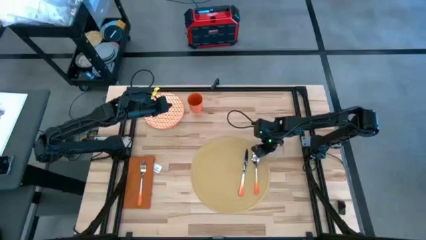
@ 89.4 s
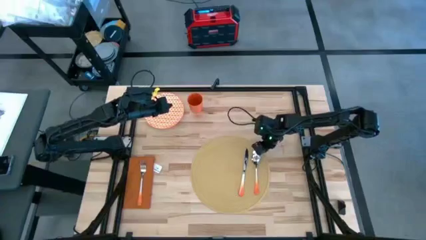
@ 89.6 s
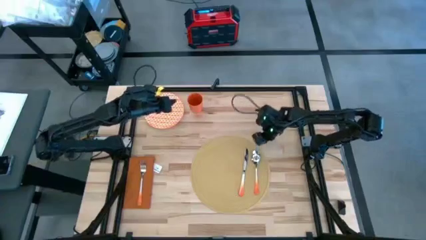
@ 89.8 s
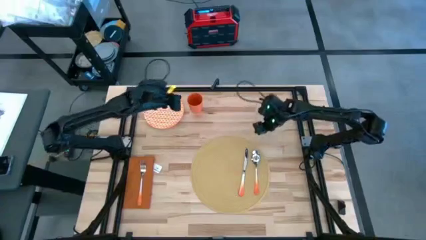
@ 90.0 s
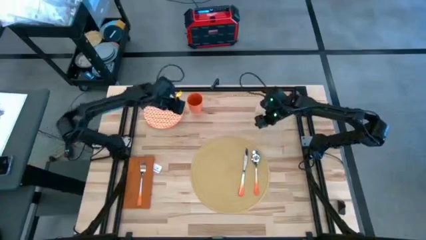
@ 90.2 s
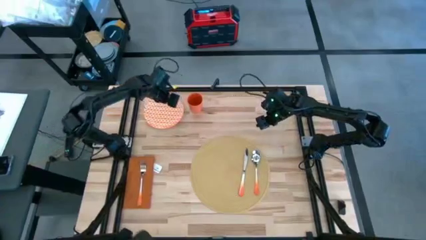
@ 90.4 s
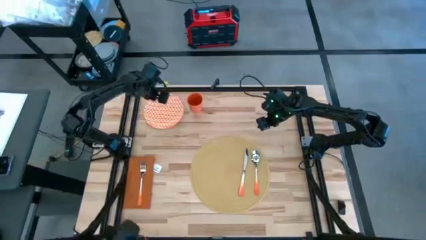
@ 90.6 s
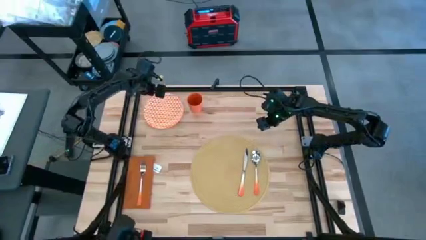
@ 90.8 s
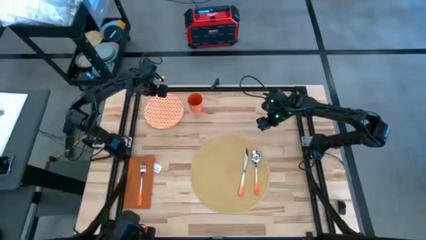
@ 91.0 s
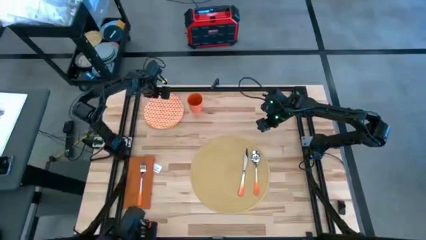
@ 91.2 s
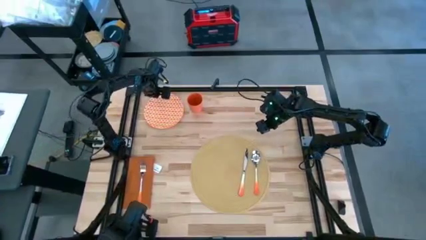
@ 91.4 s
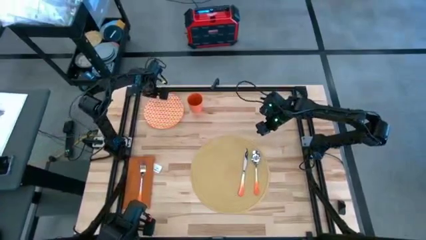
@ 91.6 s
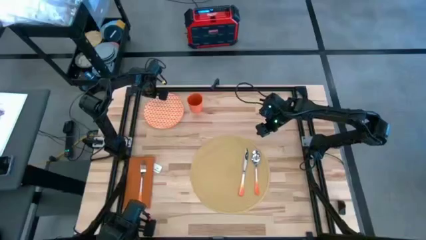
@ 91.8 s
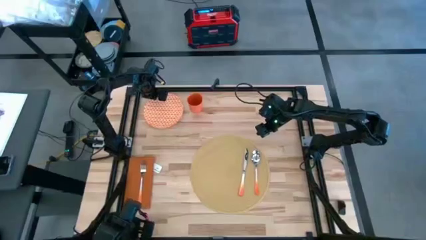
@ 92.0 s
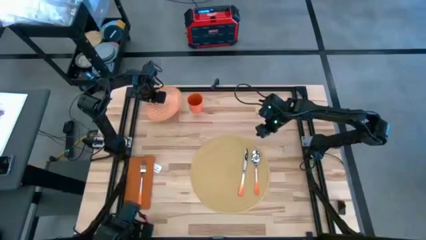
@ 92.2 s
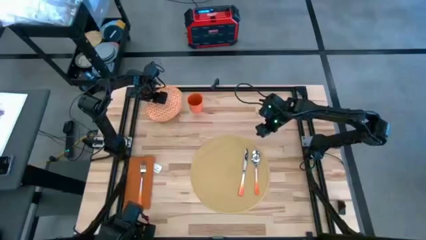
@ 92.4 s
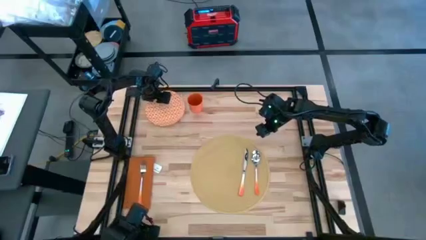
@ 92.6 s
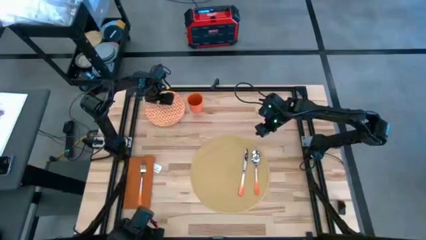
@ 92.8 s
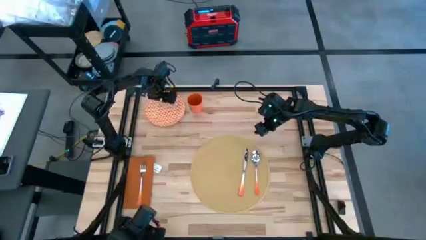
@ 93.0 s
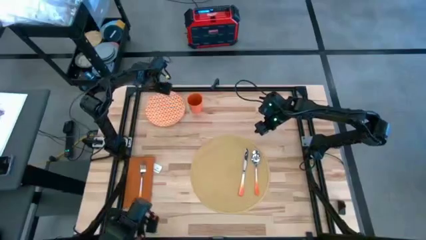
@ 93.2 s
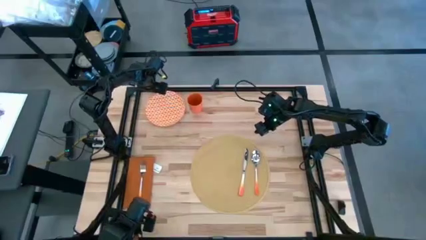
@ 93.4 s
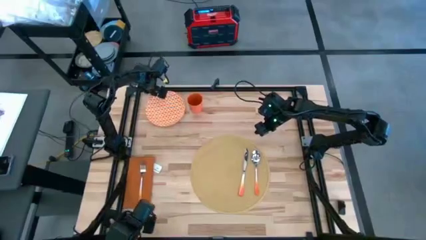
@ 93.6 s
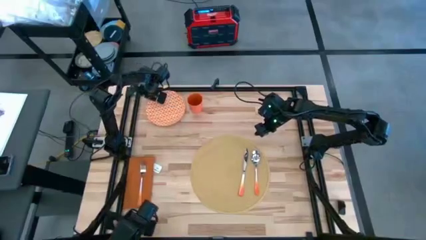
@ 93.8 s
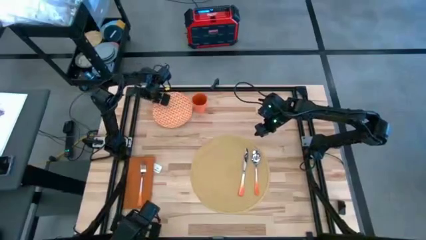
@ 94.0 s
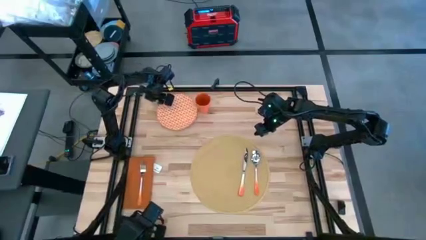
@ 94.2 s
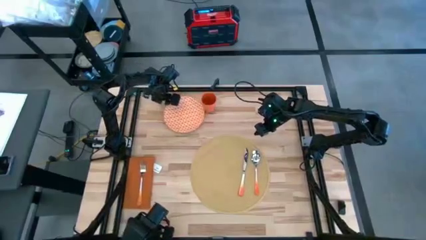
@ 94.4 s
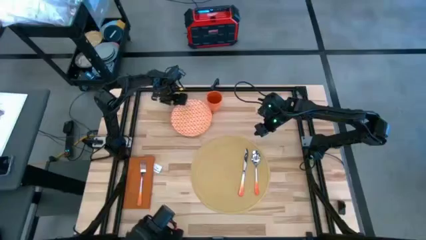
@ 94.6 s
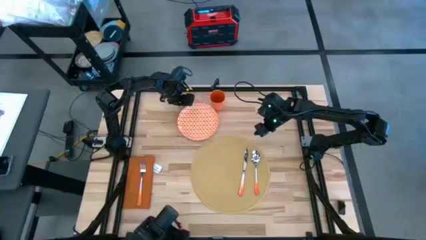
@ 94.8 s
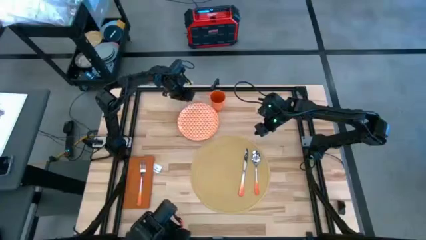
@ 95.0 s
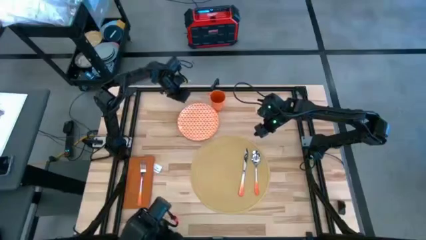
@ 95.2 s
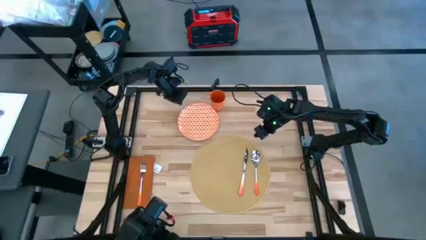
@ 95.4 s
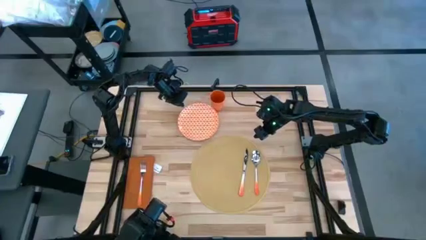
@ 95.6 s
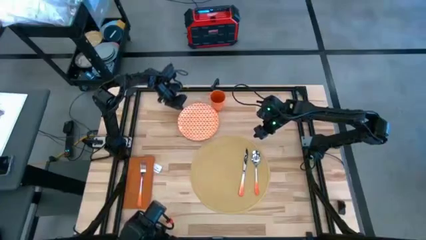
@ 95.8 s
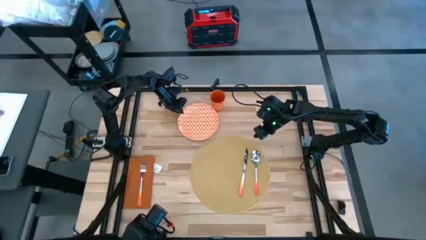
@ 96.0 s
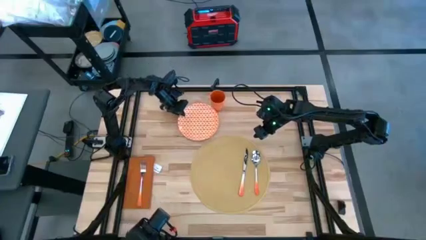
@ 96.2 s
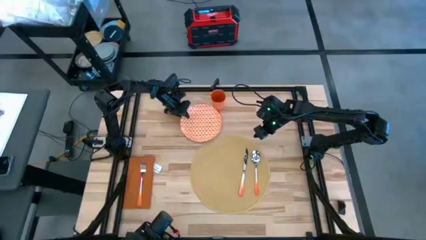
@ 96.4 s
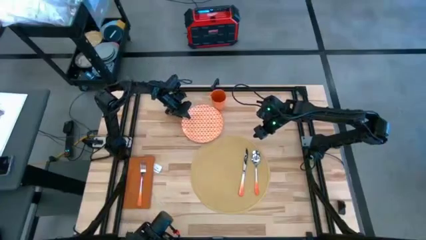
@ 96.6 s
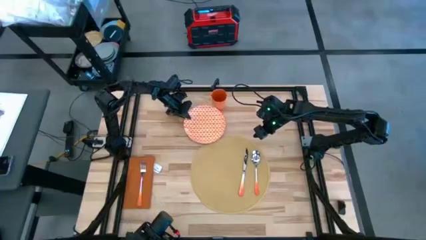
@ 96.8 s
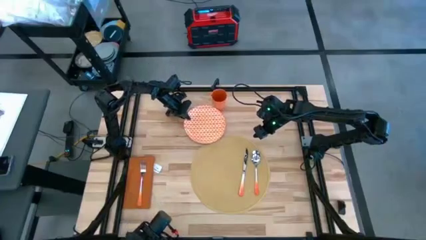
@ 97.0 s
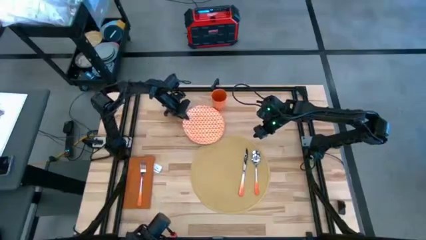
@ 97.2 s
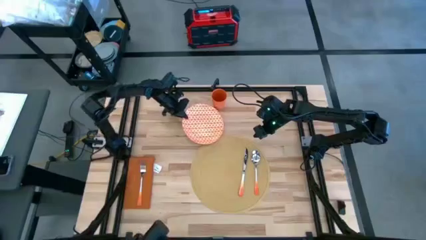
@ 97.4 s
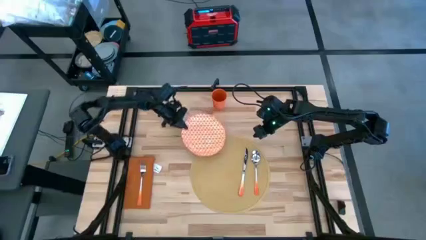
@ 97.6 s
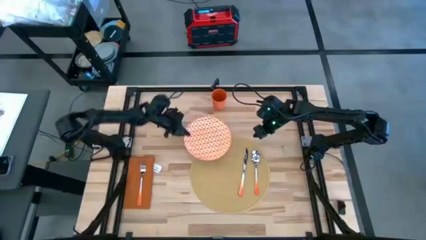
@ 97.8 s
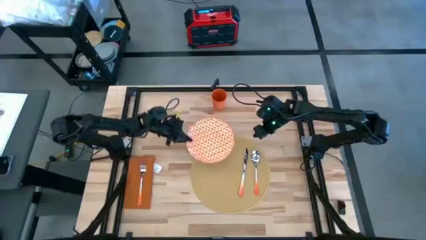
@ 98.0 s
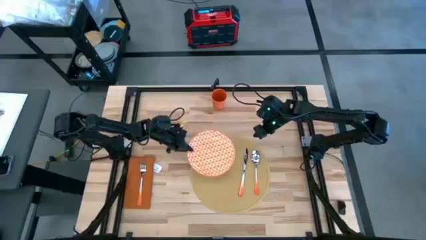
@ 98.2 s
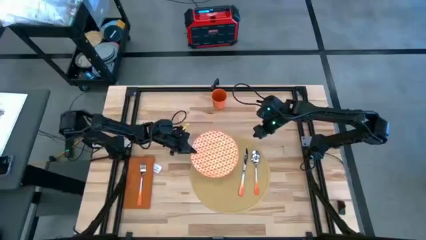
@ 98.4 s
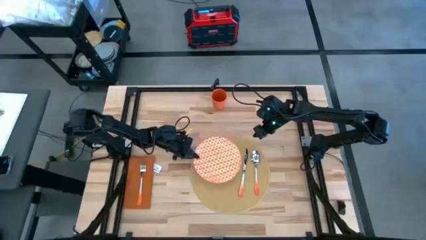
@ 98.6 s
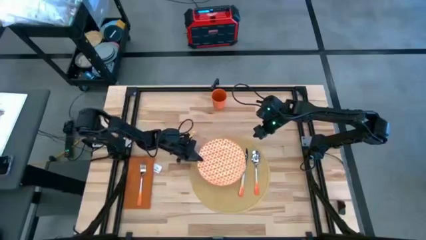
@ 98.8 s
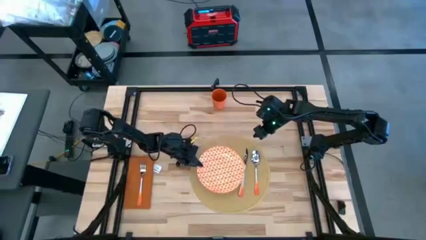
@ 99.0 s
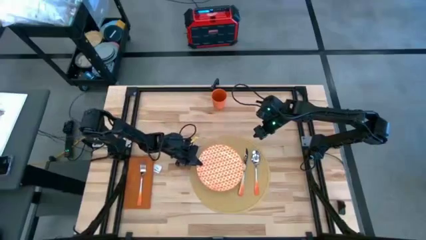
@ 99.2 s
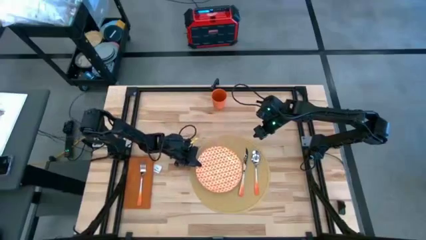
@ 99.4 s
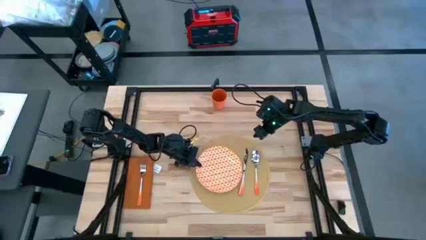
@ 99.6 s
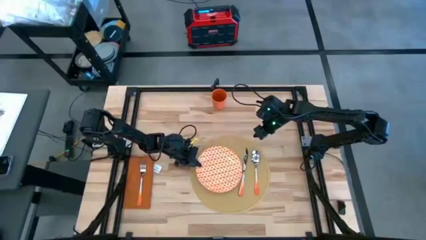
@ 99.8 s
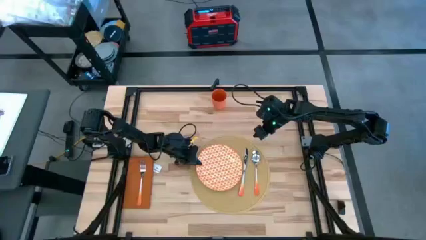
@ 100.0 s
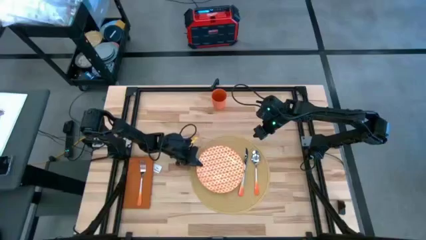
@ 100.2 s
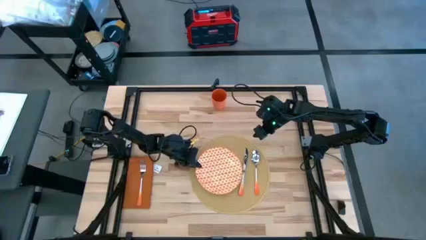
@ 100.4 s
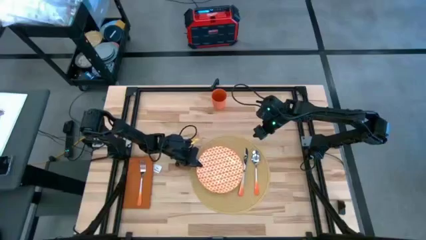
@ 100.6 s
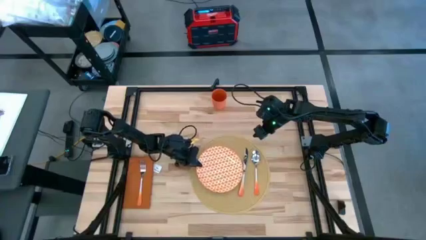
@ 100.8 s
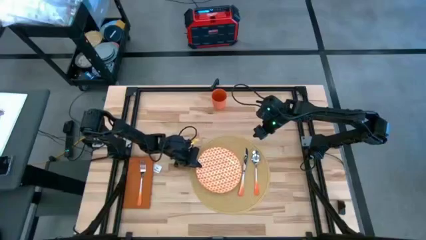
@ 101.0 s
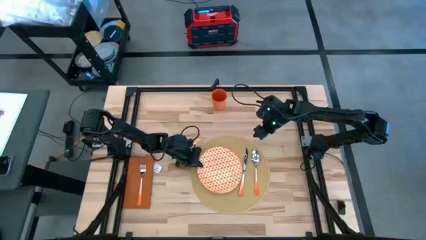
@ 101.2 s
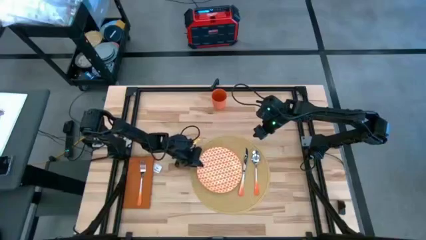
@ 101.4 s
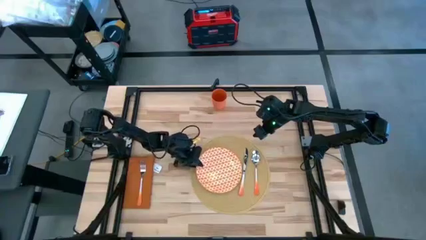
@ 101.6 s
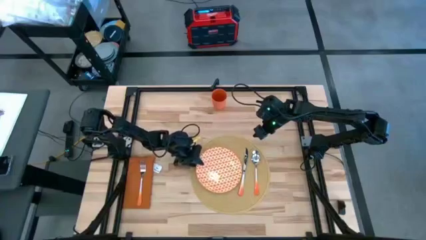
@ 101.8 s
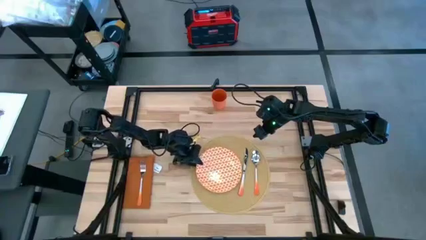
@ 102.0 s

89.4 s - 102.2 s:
Task: Set table place
Put the orange plate on the brown placemat to the left of the table knife

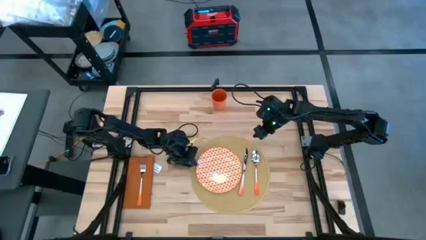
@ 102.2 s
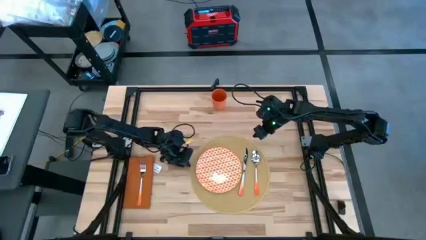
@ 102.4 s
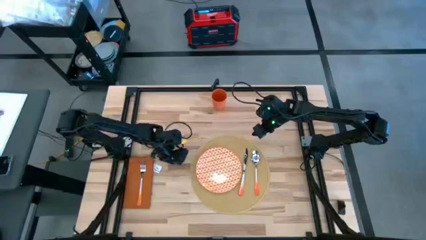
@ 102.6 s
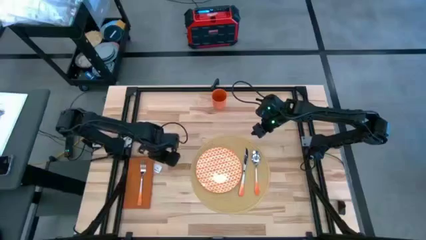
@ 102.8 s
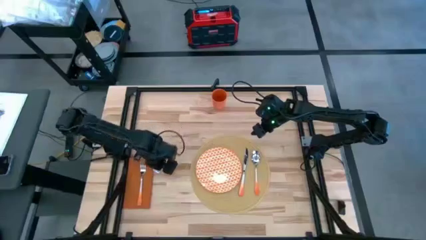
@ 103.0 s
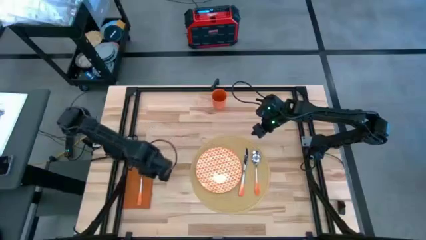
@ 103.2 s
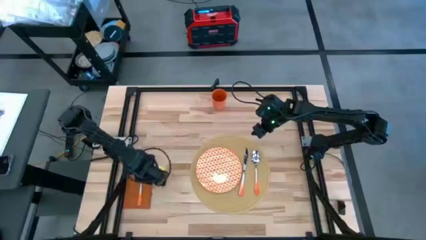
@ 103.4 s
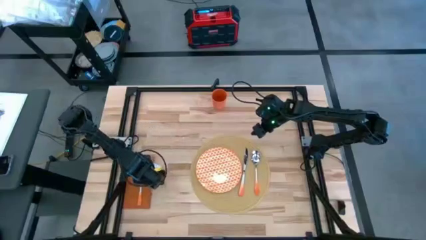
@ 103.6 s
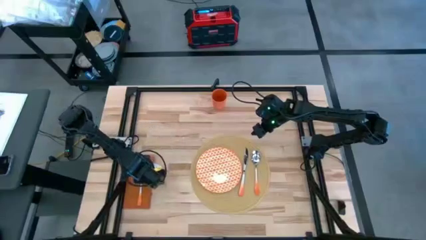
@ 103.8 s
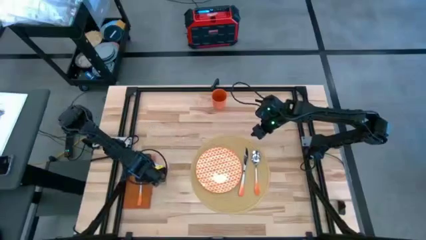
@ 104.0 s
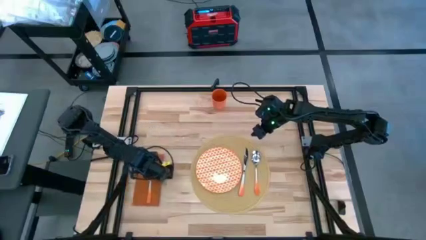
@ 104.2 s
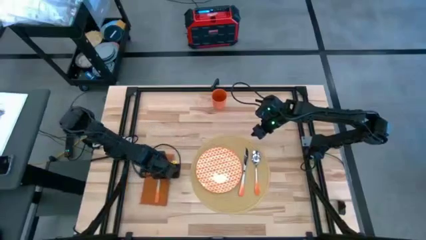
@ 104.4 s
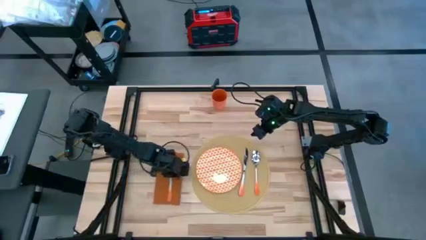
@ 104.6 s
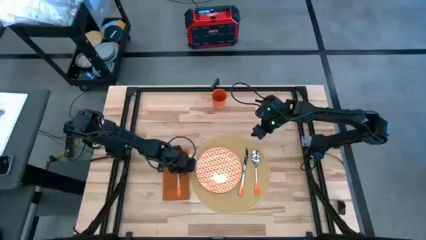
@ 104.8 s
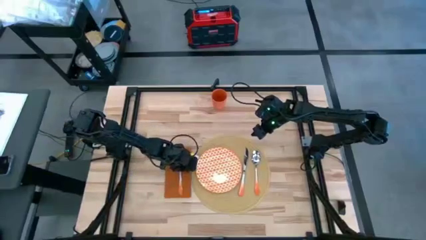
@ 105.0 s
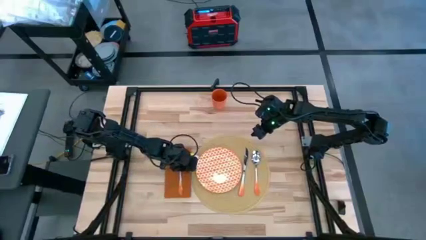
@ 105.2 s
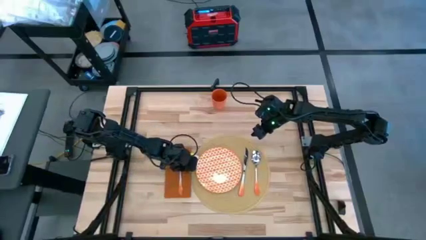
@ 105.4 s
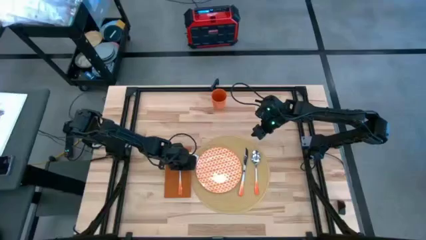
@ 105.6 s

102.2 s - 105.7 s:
Move the orange table napkin to the left of the brown placemat
